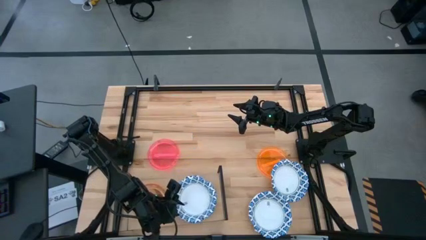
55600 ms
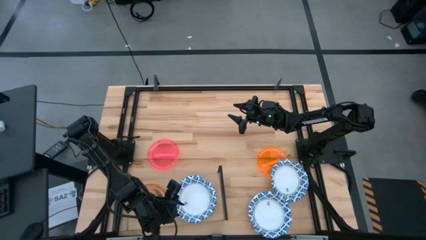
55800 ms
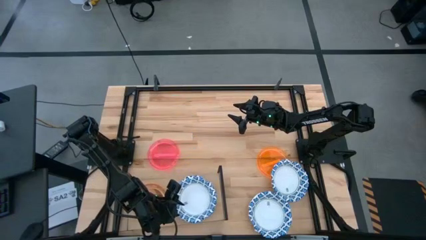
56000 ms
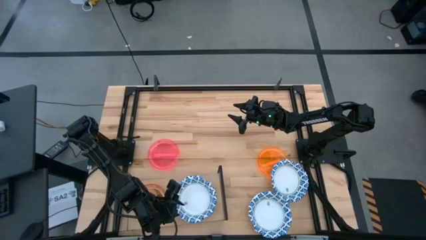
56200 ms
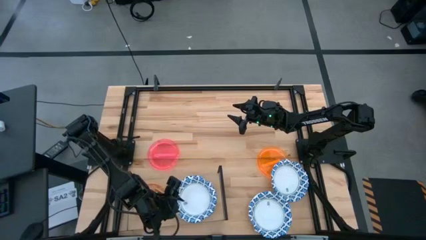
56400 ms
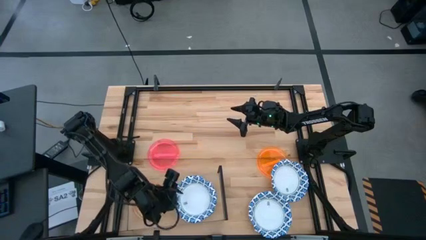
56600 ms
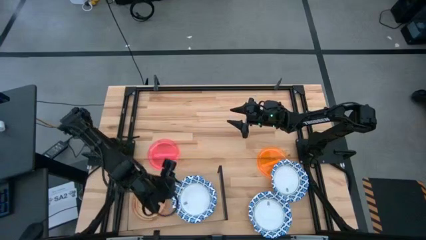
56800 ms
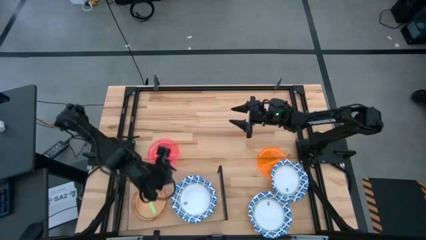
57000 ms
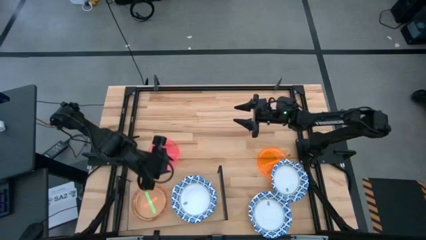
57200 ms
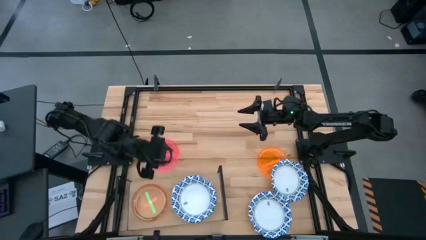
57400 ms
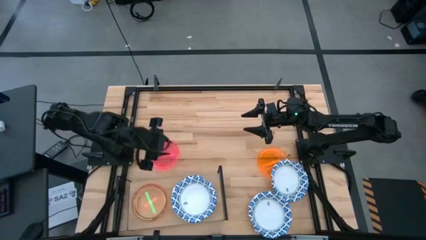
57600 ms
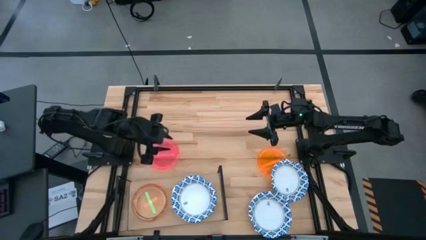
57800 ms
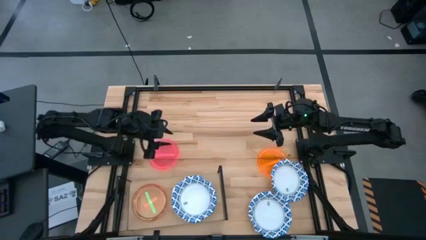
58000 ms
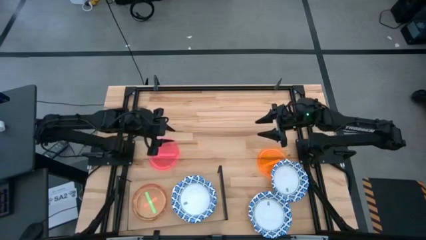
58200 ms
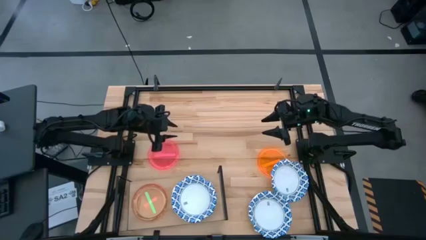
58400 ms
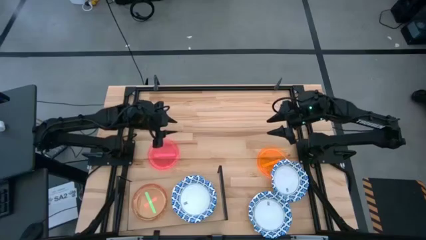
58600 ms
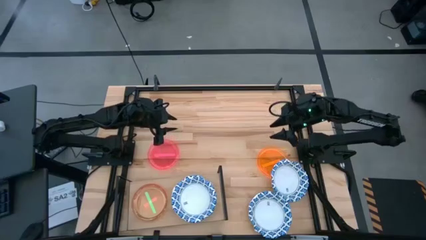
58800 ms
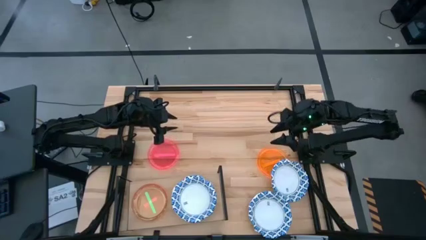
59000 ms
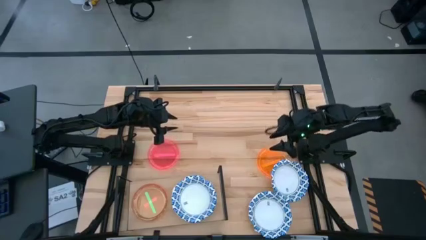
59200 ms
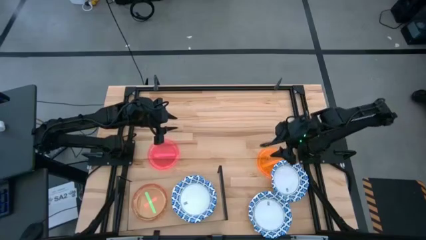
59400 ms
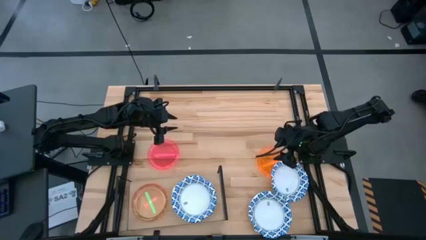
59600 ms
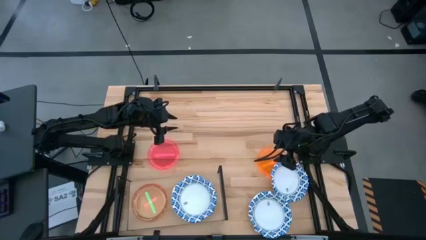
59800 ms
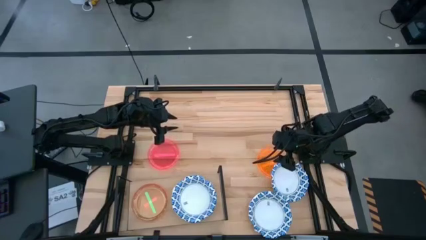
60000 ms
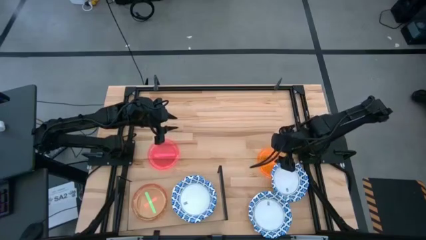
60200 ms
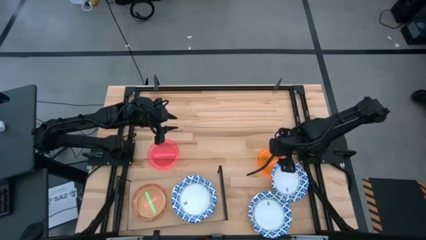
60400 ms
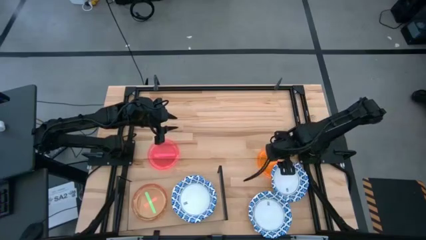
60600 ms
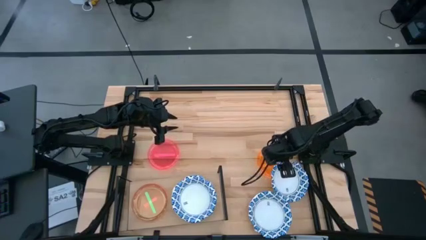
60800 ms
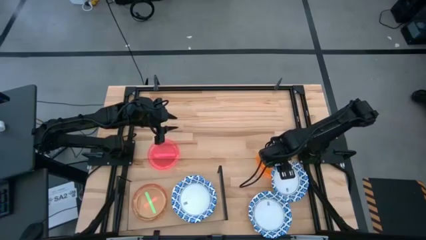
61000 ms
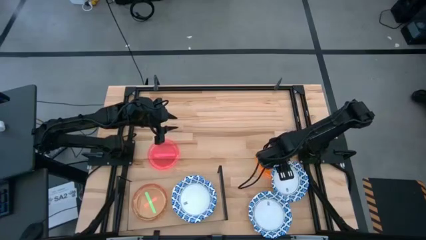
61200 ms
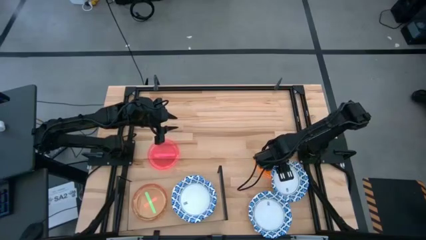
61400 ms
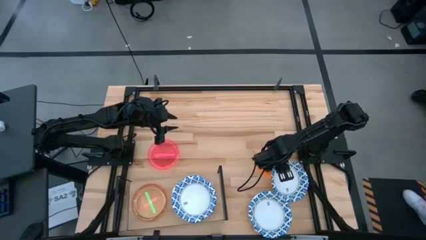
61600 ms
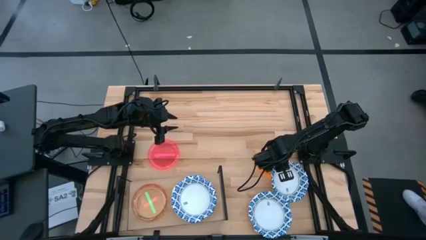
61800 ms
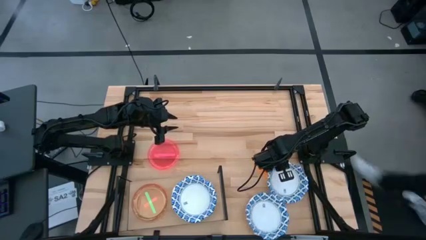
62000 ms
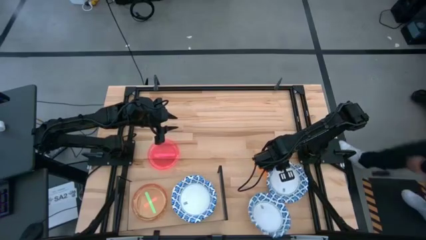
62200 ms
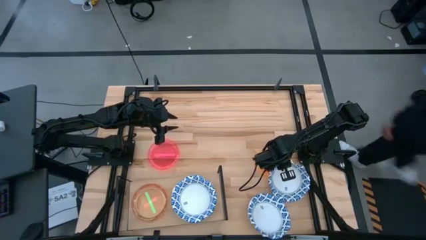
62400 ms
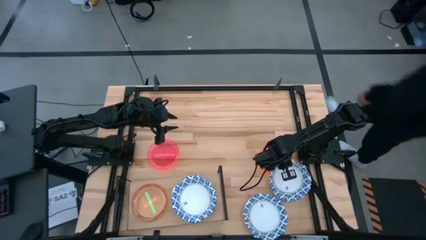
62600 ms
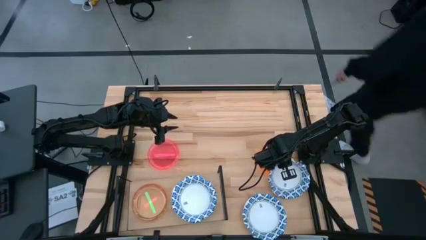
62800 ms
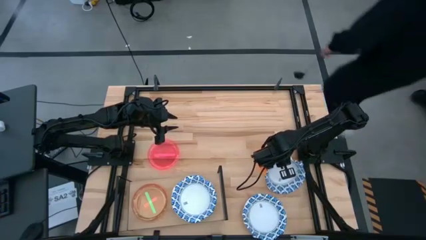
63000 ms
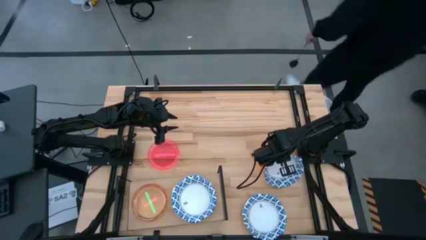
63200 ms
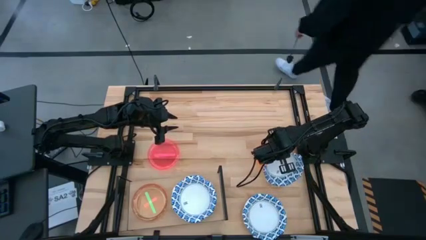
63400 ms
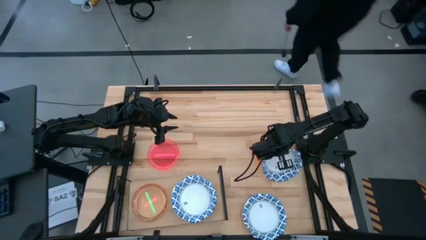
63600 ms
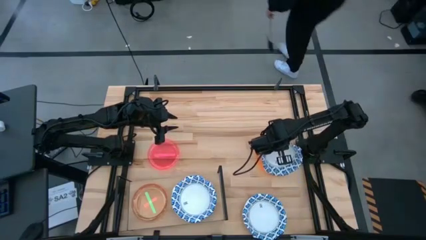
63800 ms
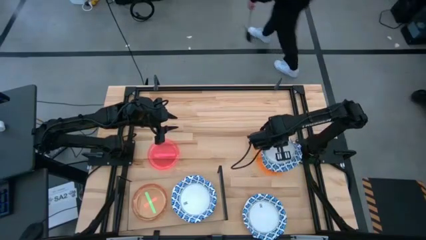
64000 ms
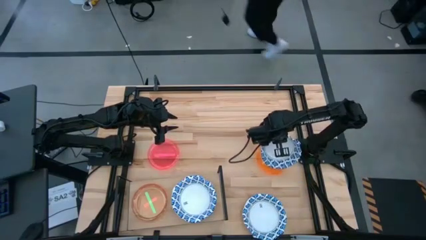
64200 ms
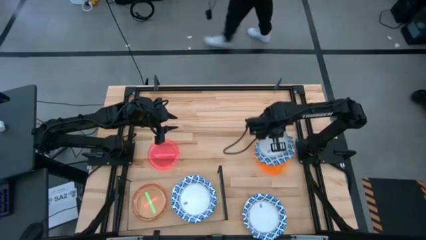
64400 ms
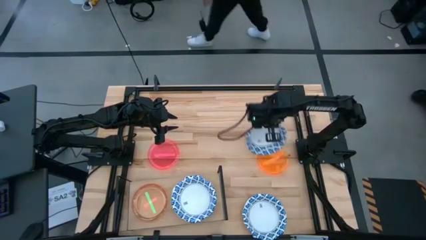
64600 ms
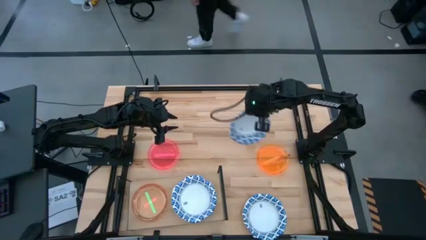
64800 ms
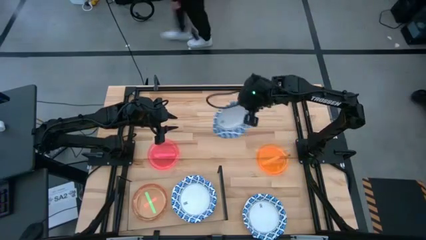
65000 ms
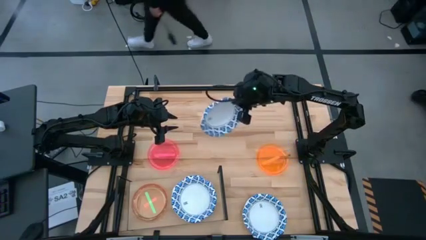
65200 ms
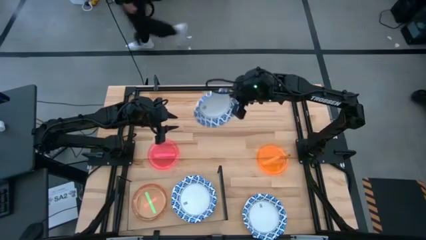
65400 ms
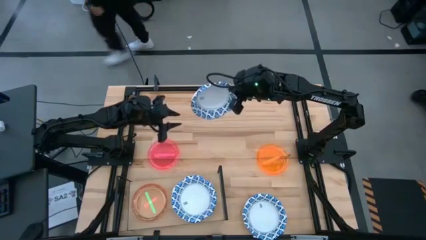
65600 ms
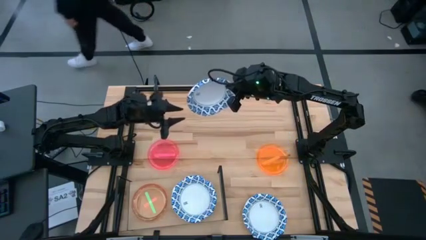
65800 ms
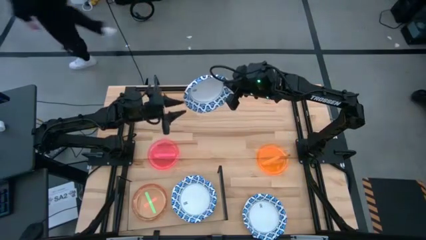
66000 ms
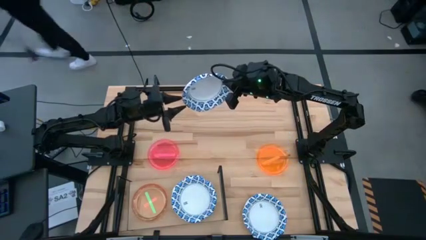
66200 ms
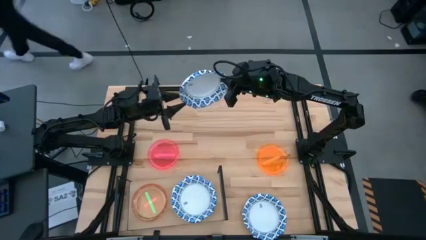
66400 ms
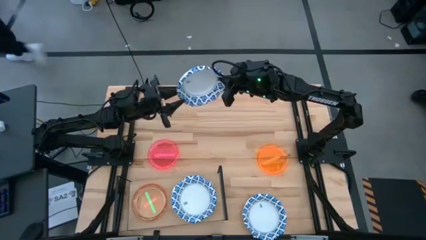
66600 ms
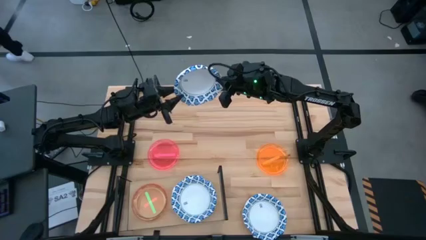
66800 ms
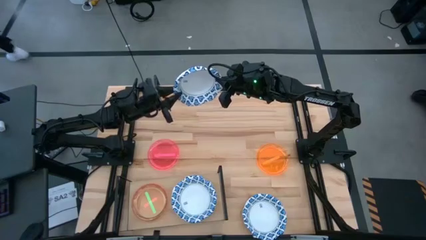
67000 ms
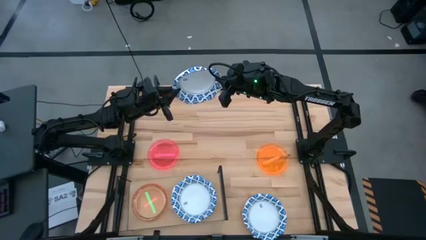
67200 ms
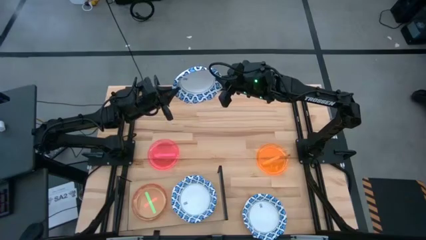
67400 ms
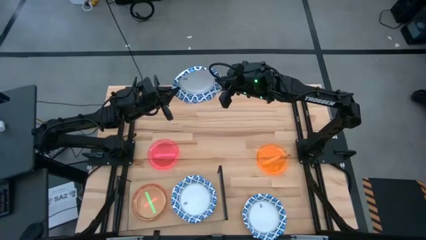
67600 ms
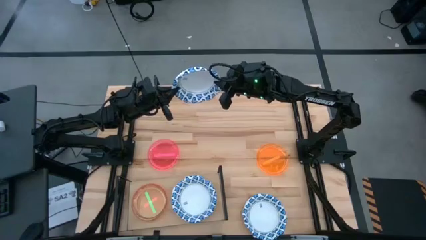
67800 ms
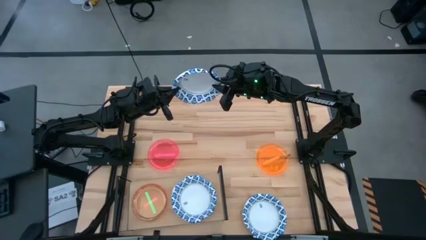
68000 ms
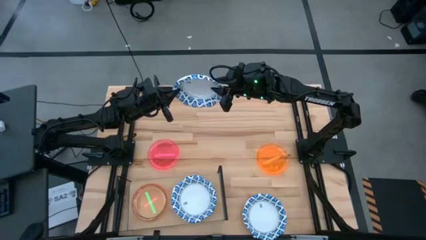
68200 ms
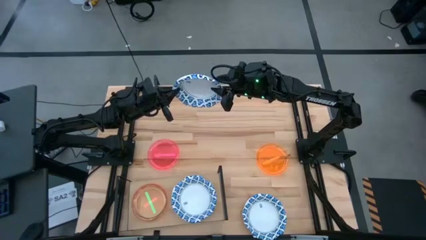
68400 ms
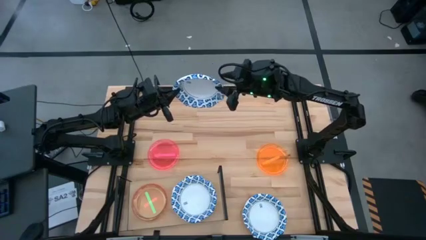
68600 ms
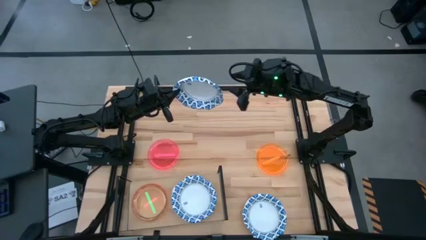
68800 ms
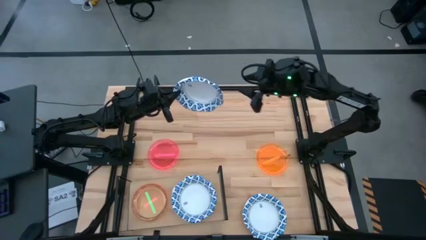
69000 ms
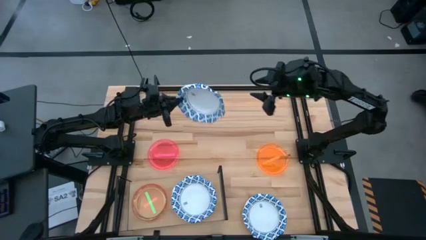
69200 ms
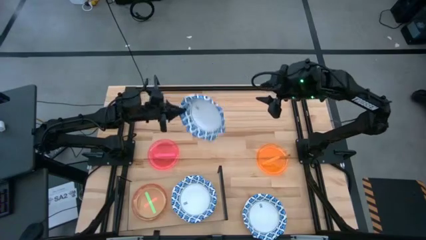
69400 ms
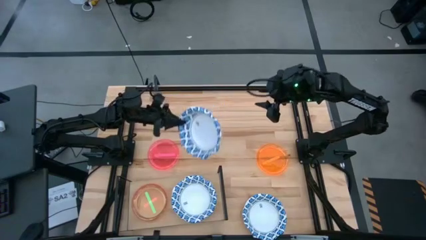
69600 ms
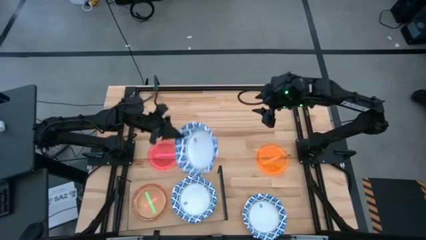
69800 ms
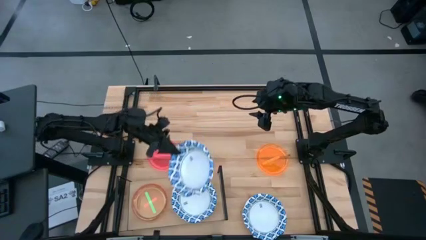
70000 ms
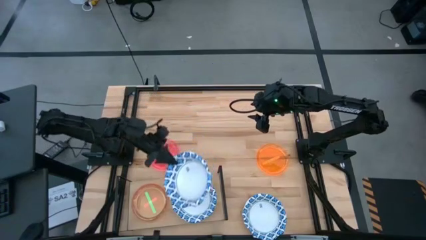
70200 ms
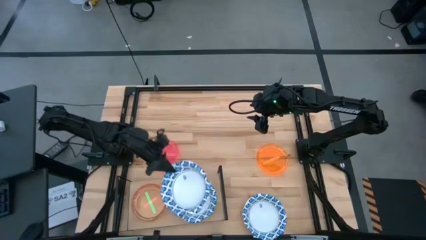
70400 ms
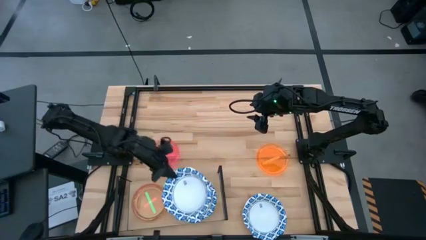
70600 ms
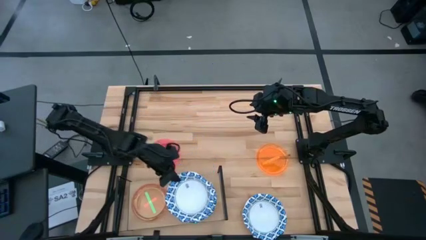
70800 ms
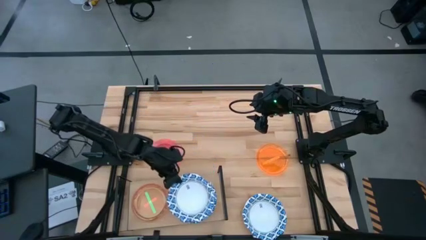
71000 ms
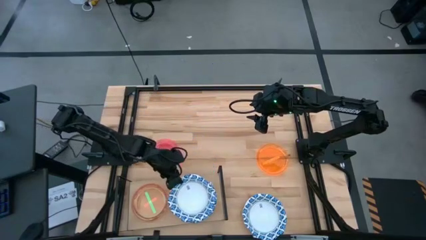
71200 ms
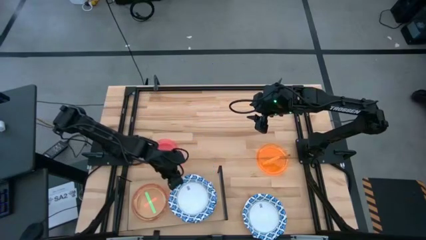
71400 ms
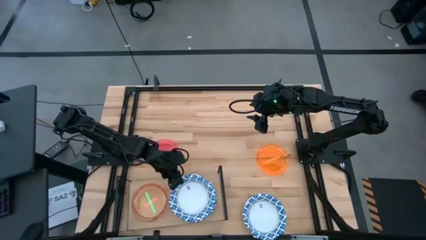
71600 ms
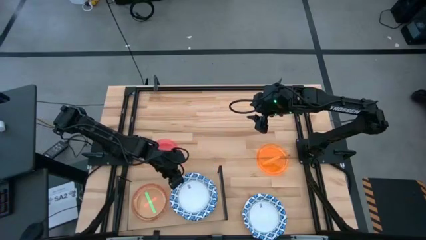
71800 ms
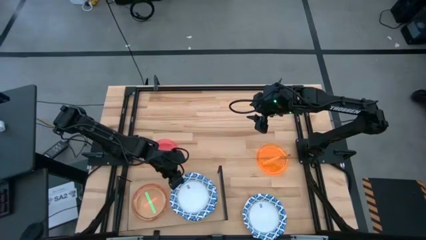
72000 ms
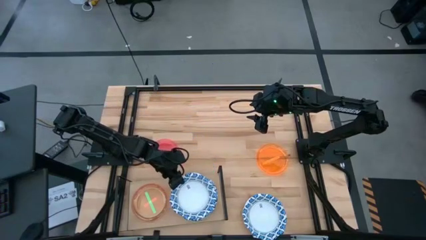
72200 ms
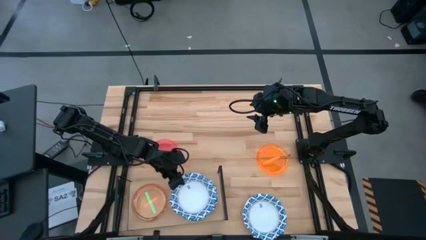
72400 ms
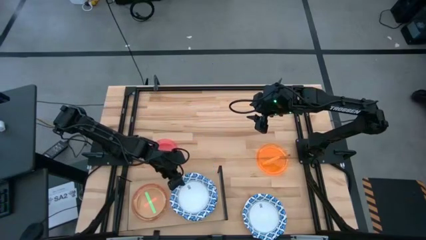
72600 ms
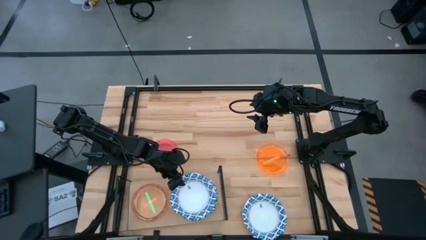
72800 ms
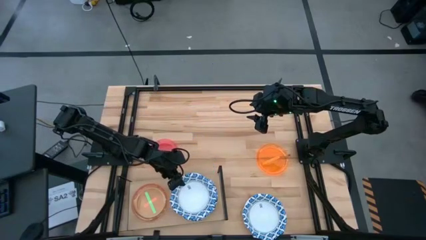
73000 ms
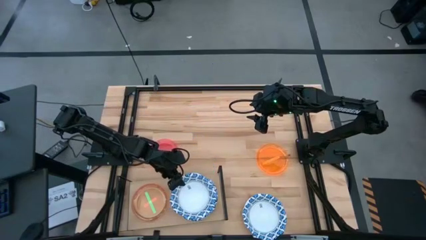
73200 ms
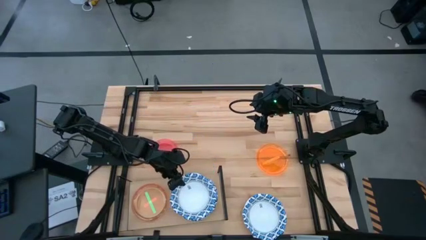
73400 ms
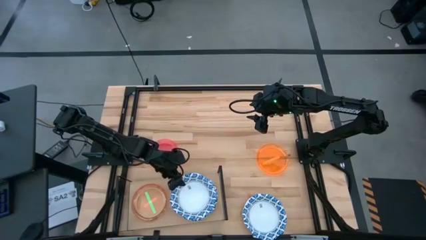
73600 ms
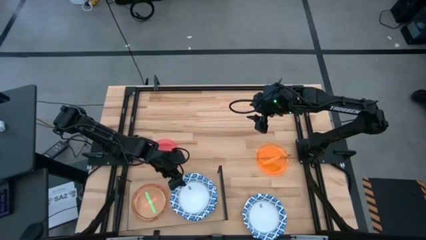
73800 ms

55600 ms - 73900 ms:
Task: Place and stack plates onto a shelf
Stack the top blue bowl on top of the other blue bowl on the shelf
